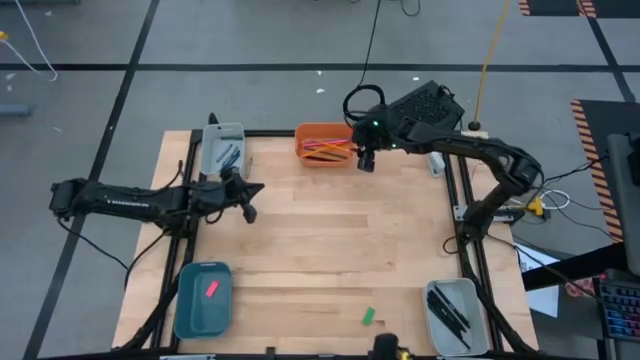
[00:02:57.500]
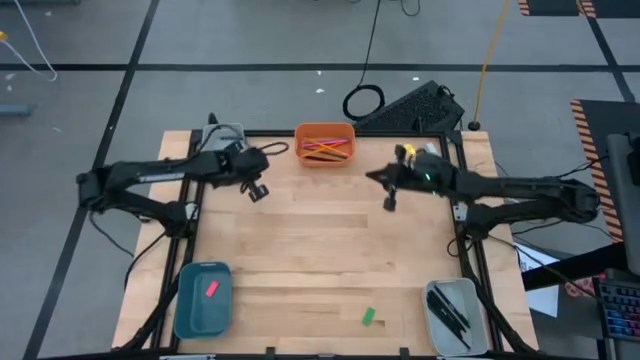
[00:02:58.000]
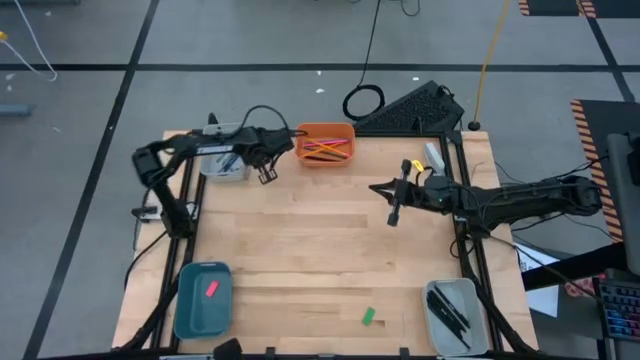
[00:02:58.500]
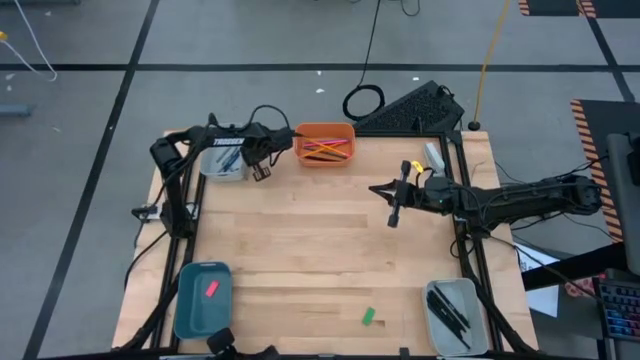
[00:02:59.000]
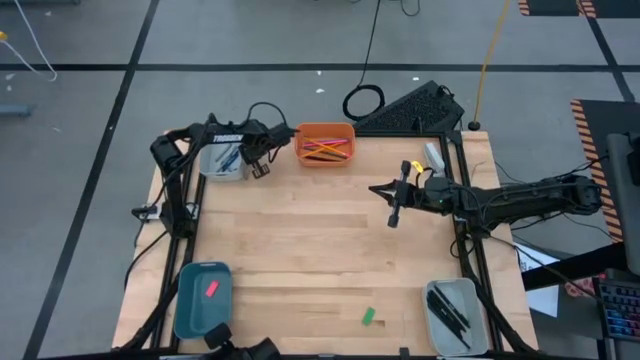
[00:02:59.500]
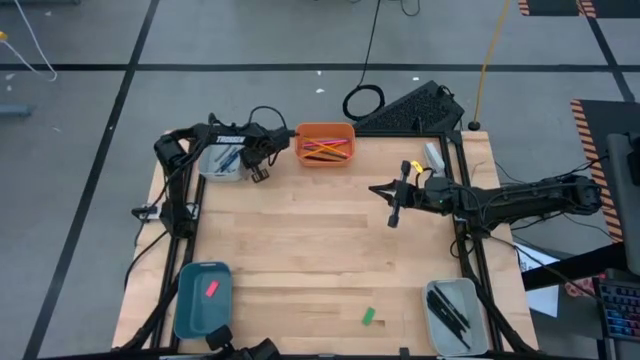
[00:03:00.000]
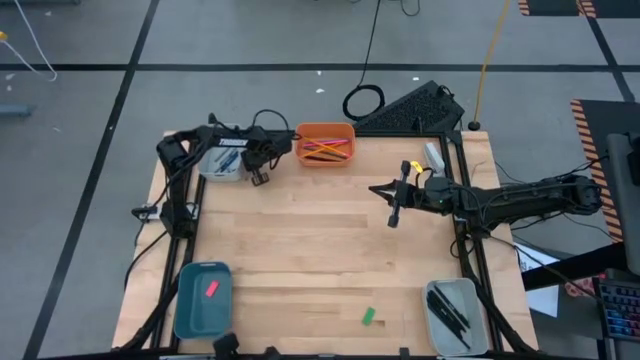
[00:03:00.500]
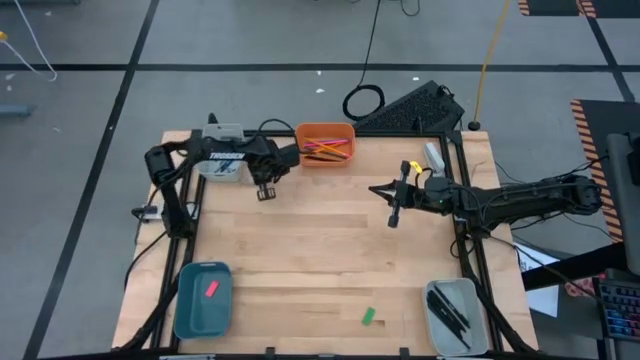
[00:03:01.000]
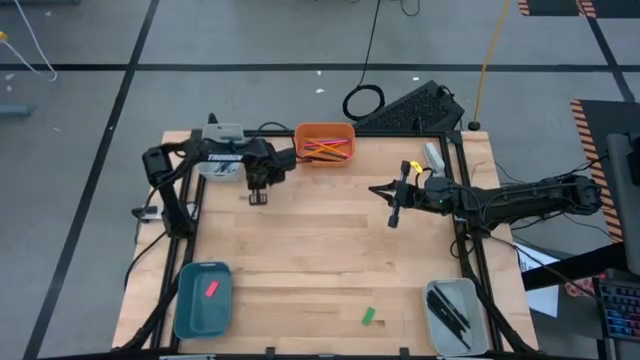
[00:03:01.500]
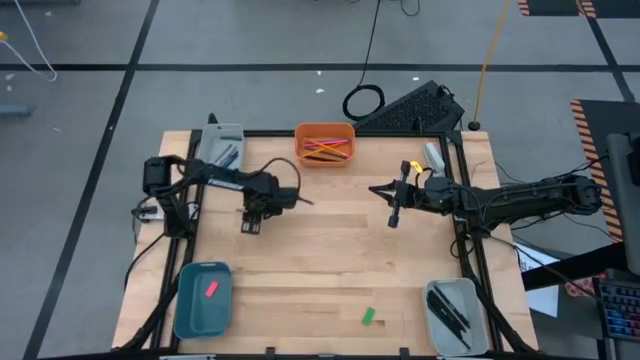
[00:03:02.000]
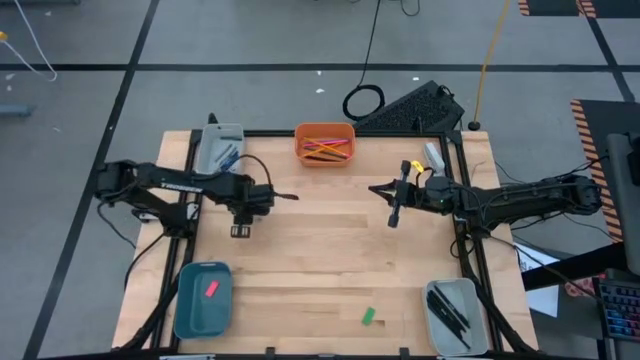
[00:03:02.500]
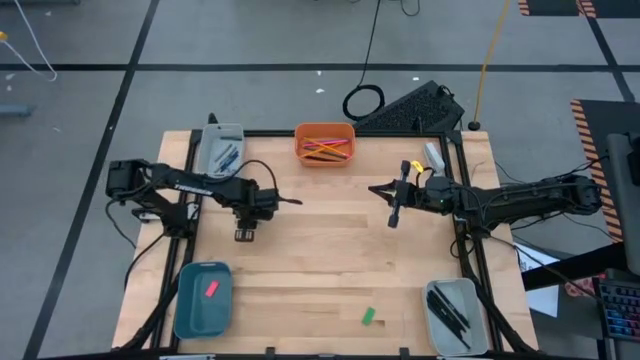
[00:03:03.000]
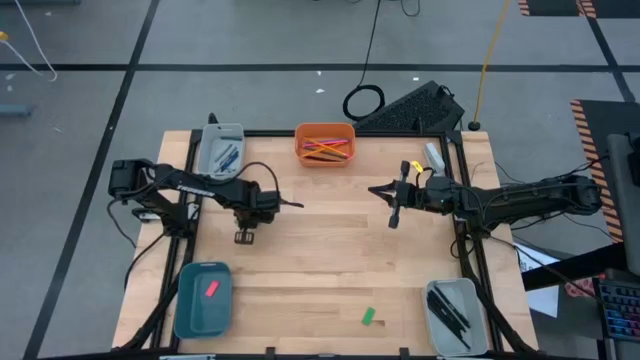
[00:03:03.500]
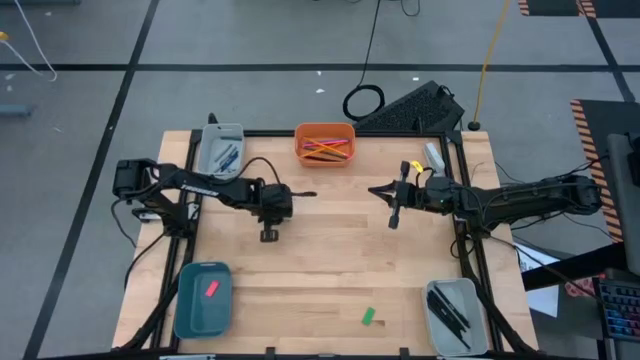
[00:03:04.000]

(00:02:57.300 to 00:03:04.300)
Task: Sort crayons/erasers/pens/pencils in bins
Put the gray crayon into the top gray bin

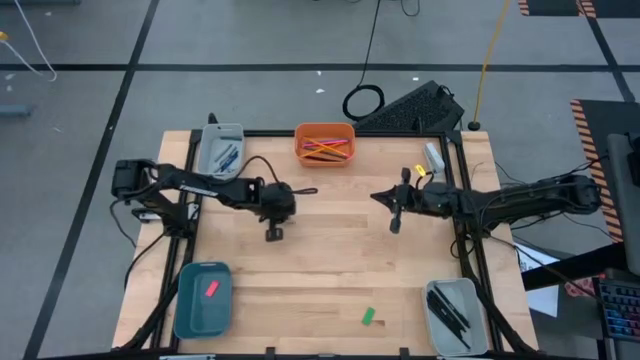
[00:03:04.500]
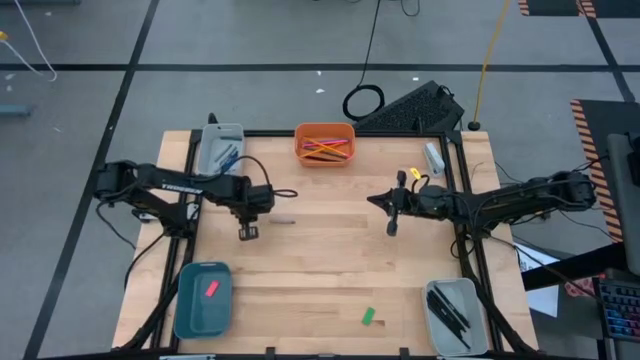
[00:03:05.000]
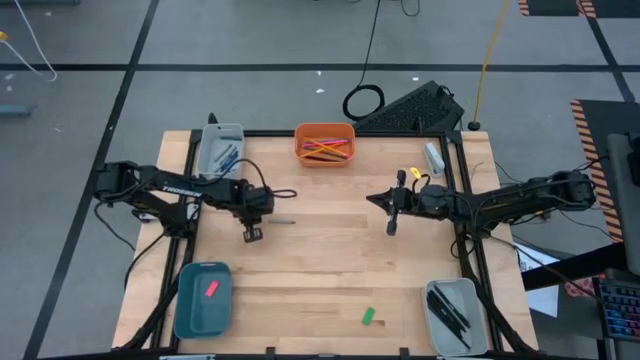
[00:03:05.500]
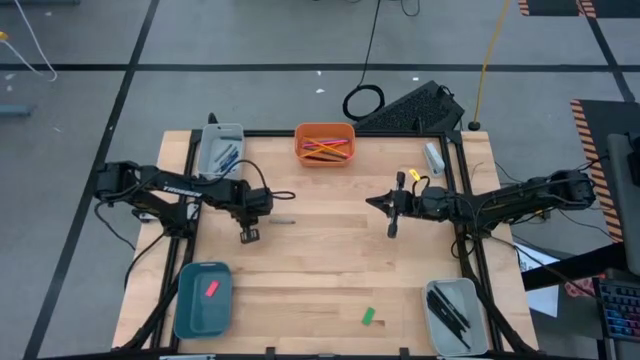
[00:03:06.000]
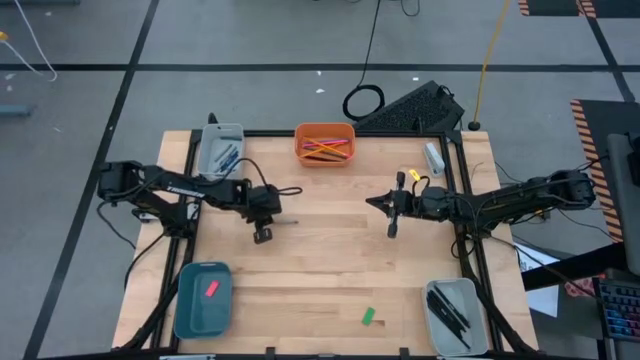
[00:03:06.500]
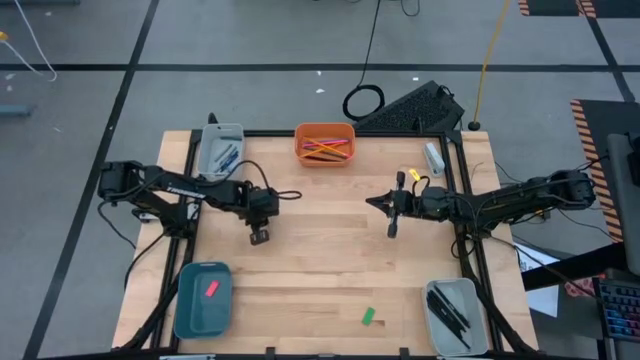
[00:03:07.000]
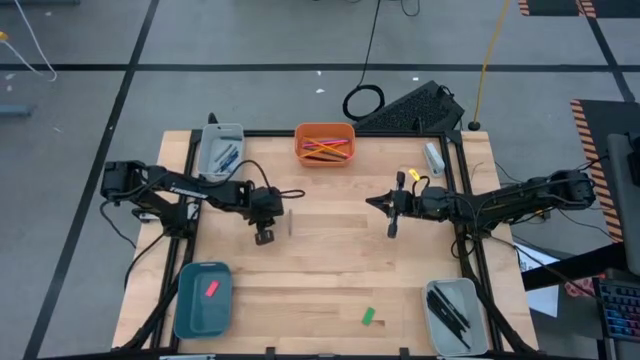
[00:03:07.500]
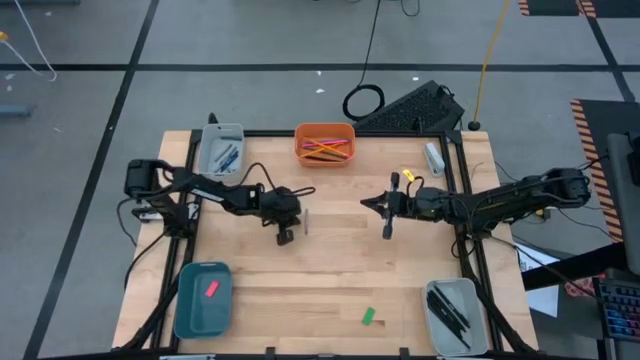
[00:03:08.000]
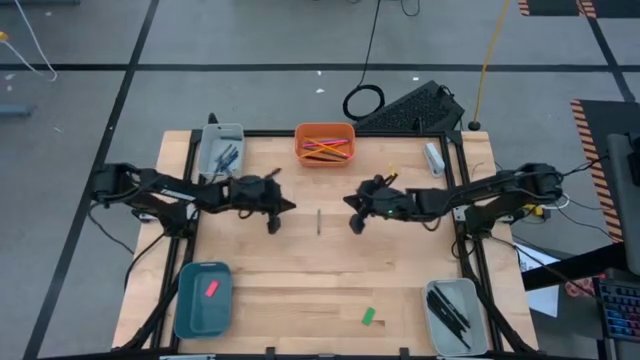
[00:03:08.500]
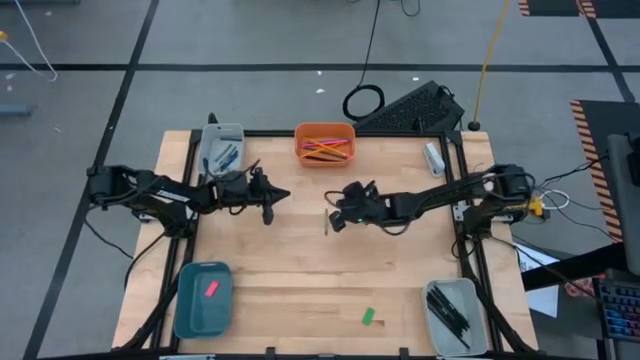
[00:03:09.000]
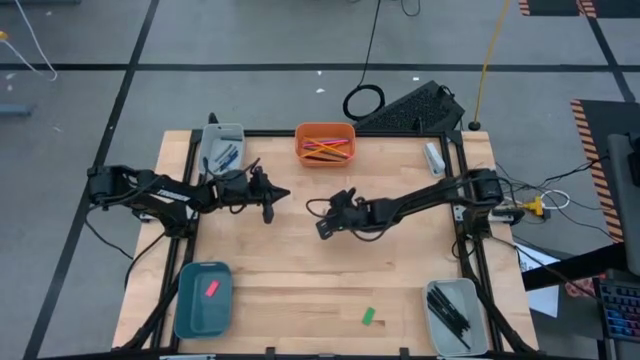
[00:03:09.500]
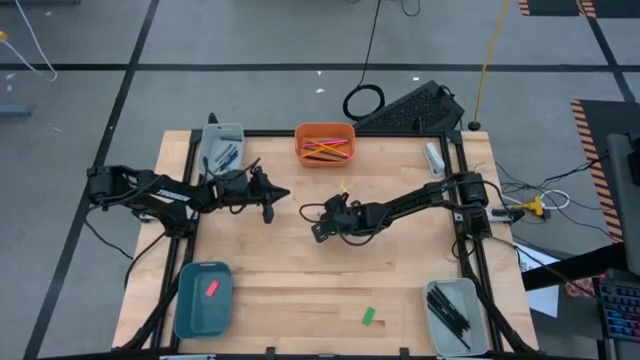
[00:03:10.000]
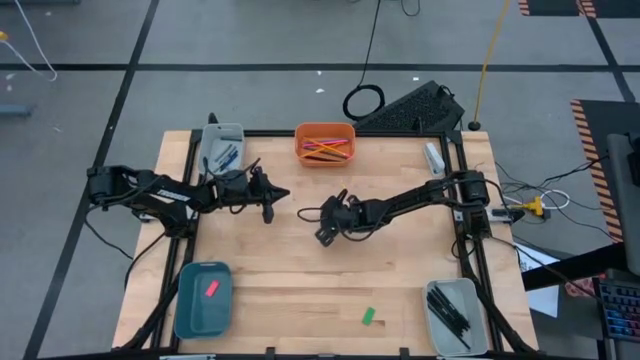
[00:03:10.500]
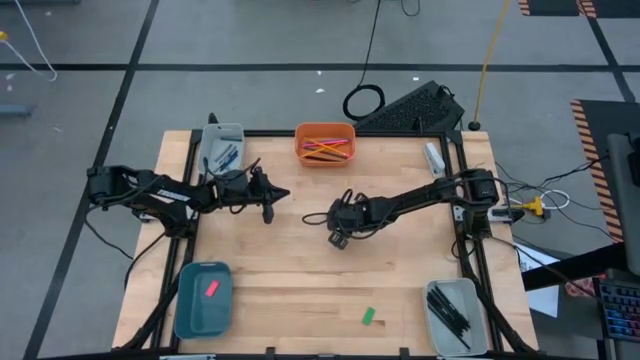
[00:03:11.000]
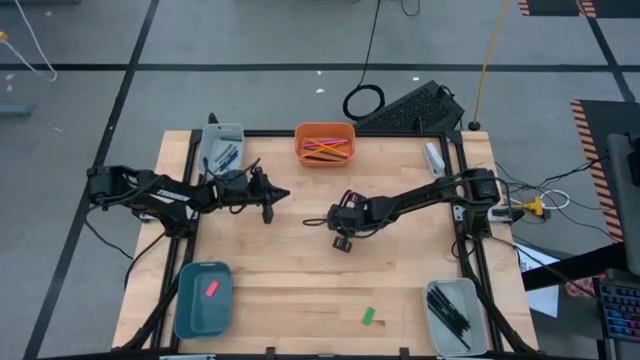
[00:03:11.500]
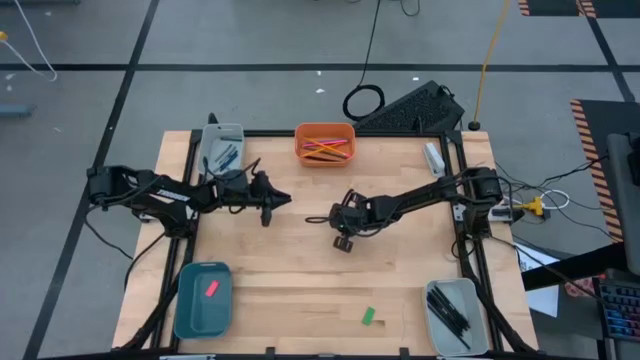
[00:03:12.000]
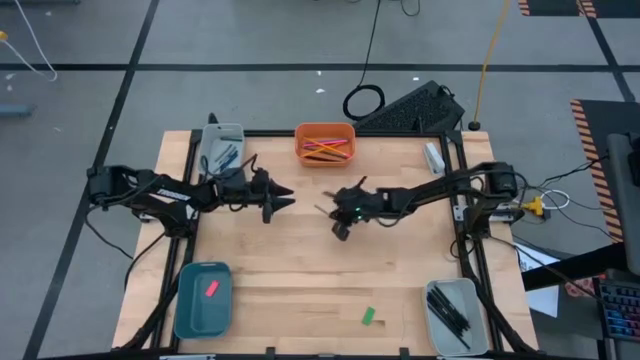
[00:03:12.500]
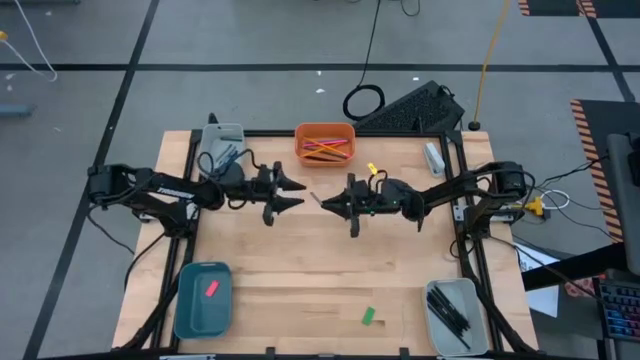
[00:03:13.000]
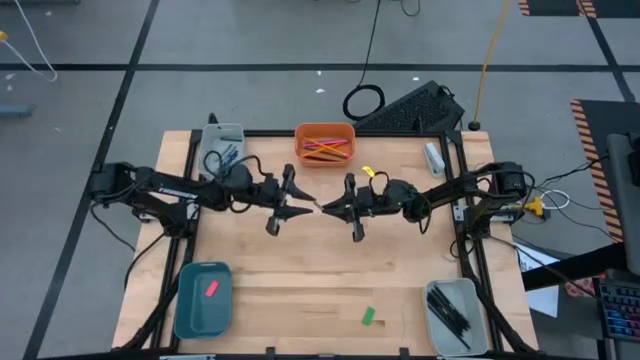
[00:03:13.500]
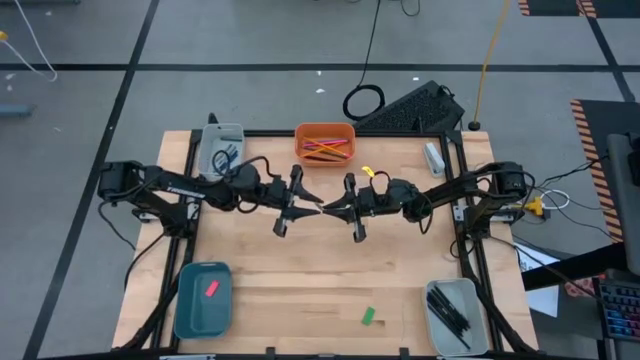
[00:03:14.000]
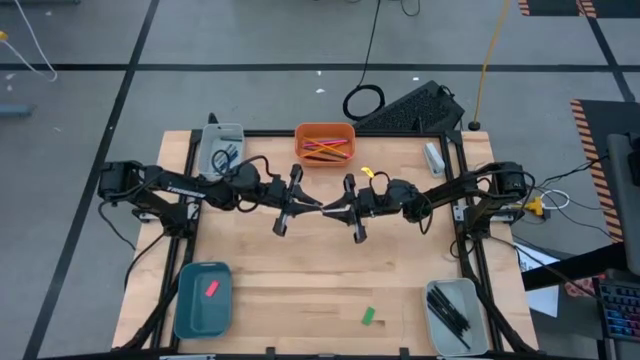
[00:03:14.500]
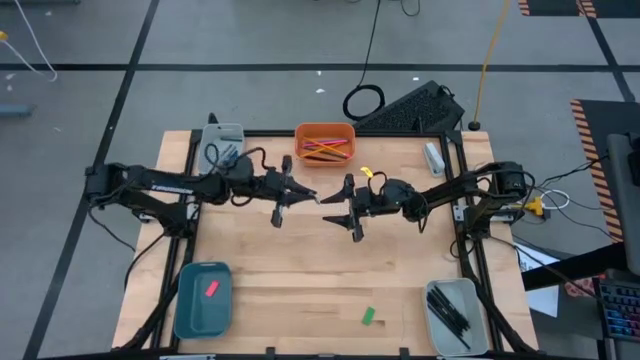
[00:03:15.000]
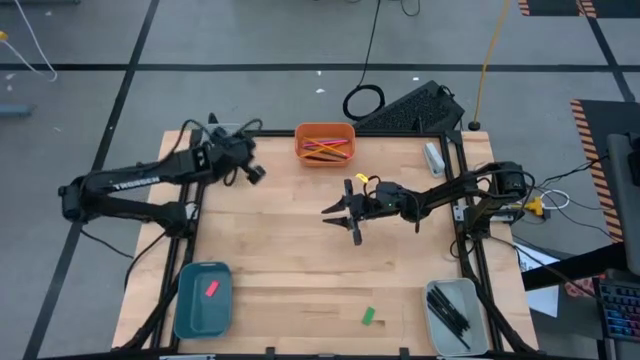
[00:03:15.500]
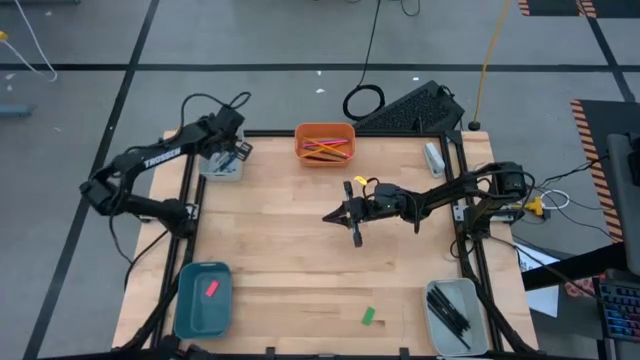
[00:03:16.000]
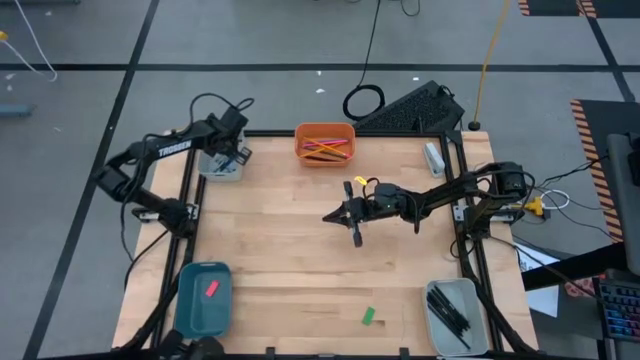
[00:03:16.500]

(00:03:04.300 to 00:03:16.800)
Put the gray crayon into the top gray bin
